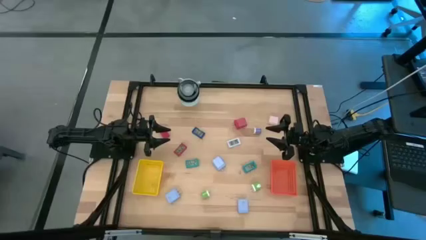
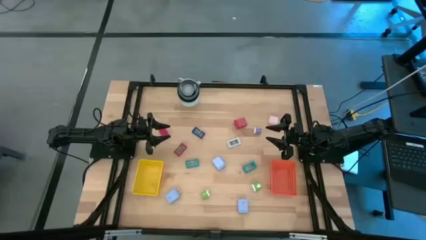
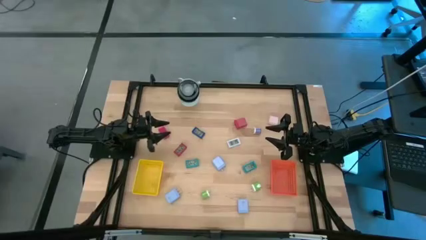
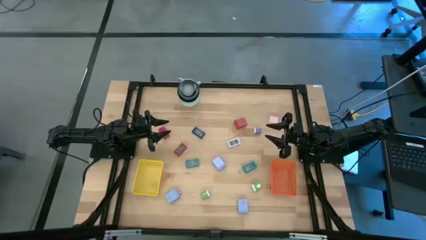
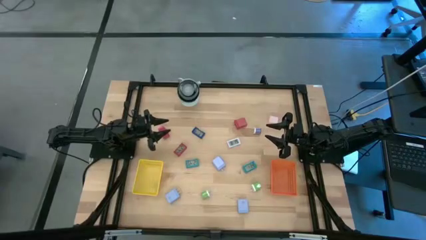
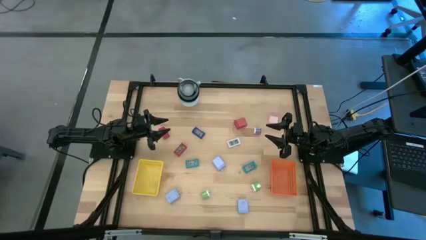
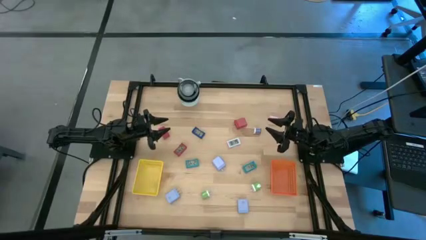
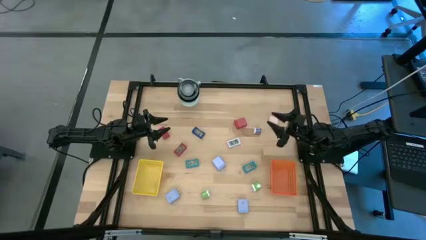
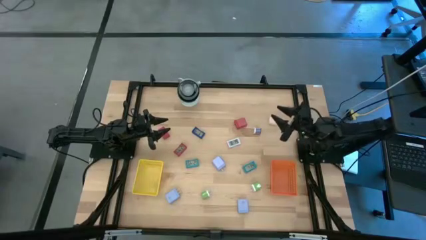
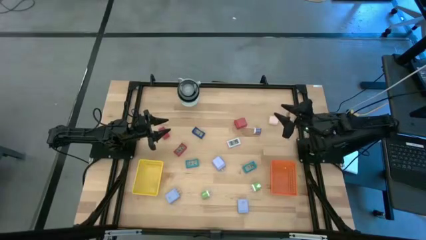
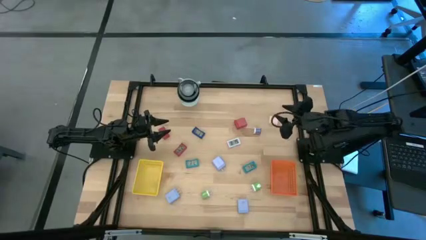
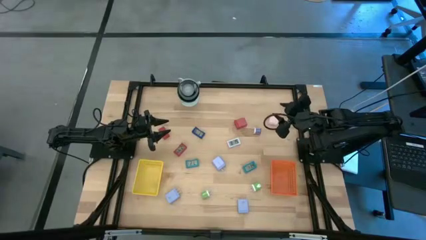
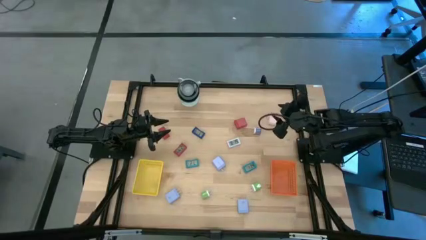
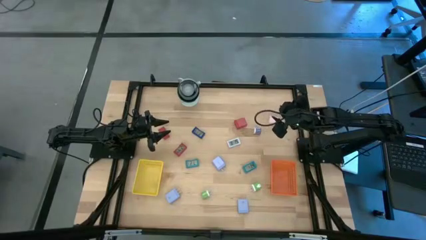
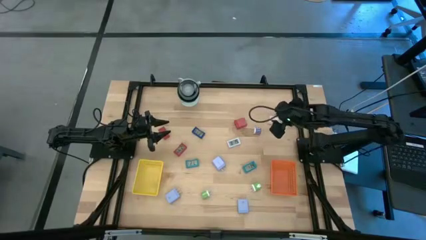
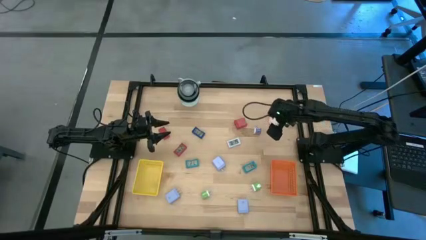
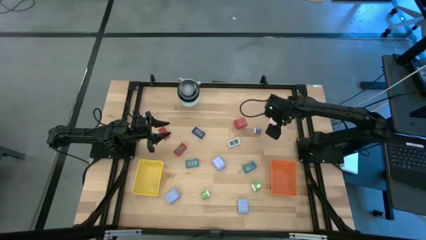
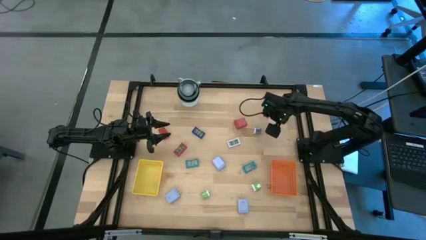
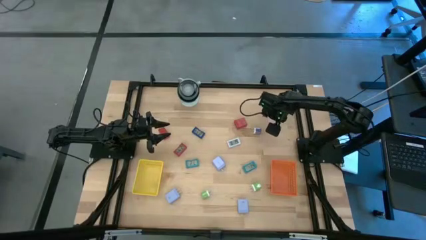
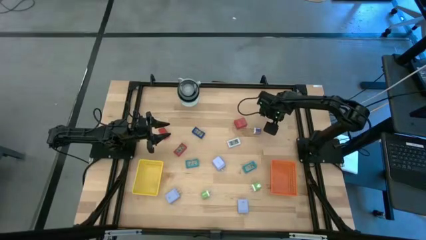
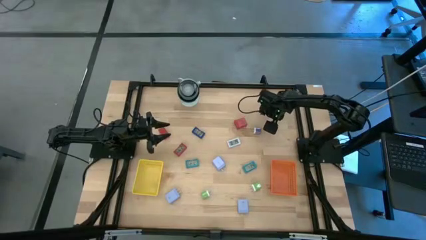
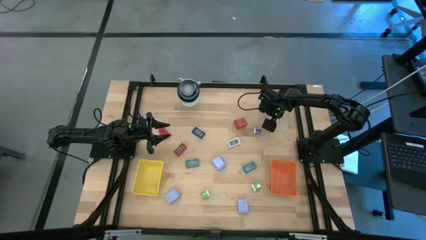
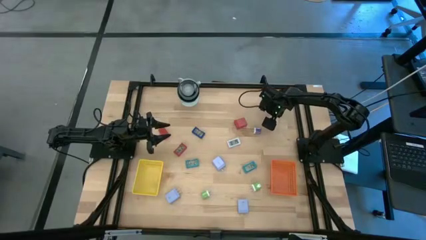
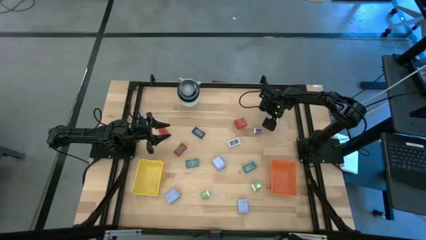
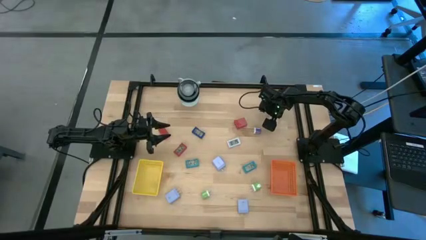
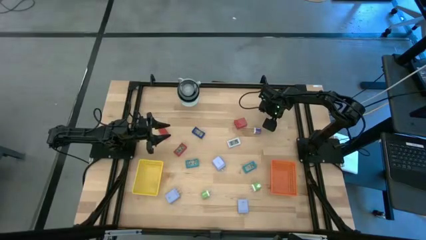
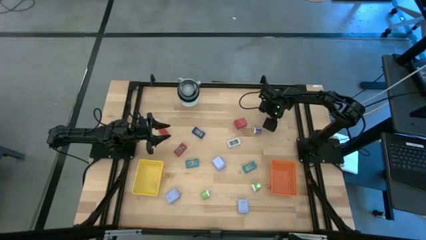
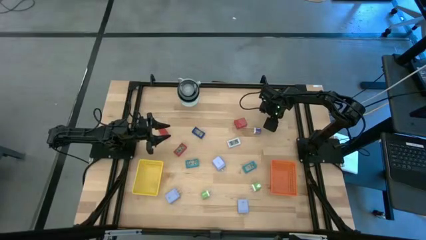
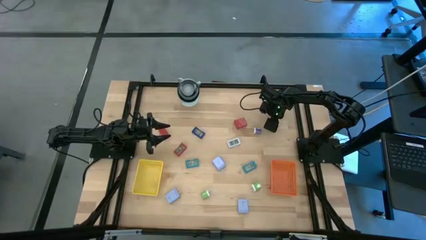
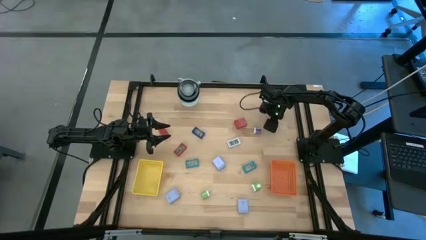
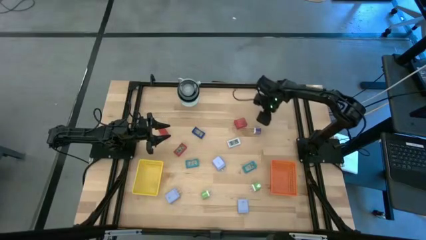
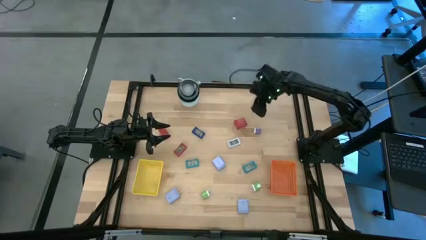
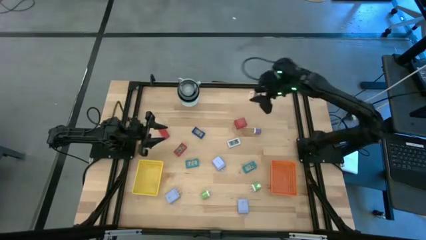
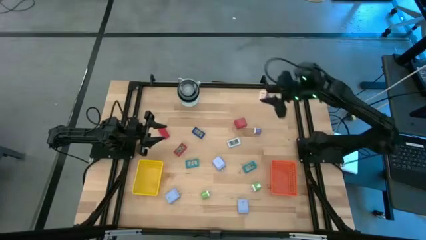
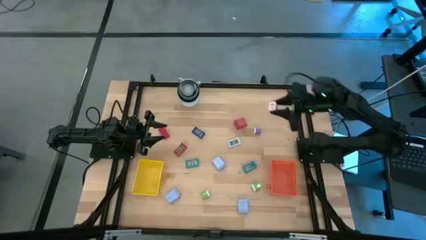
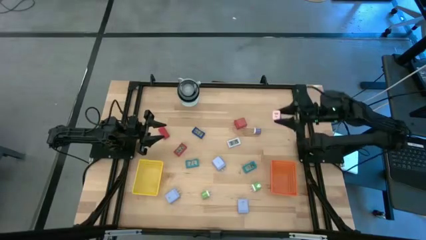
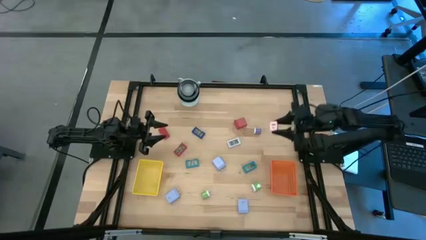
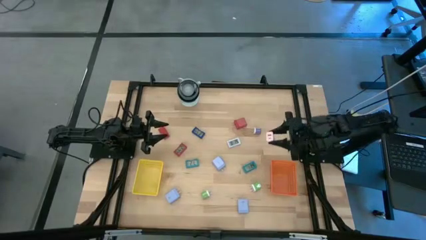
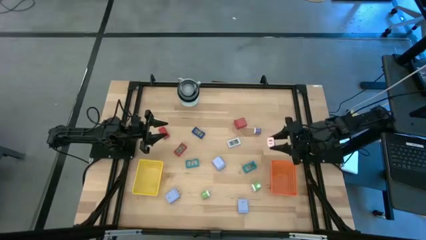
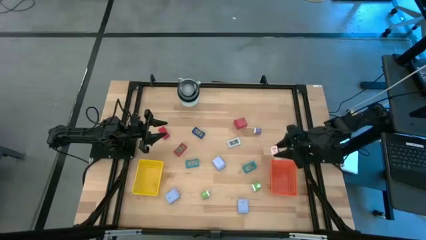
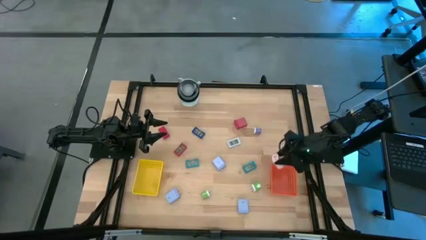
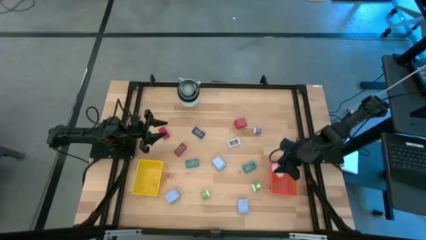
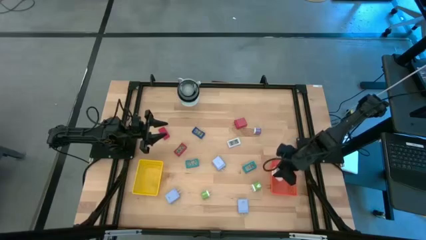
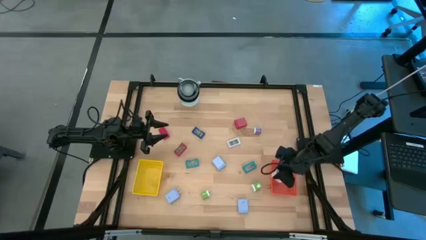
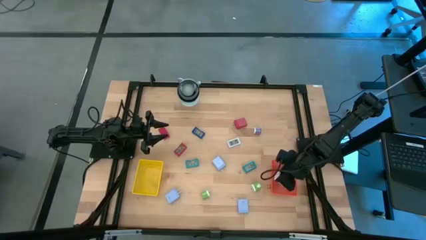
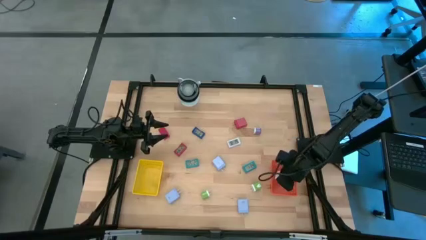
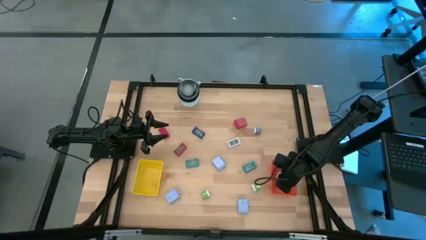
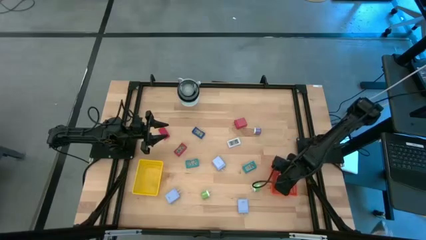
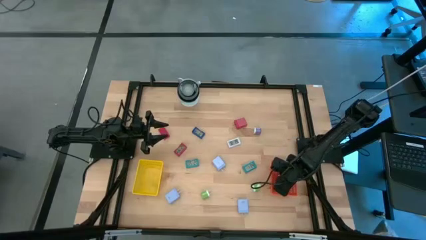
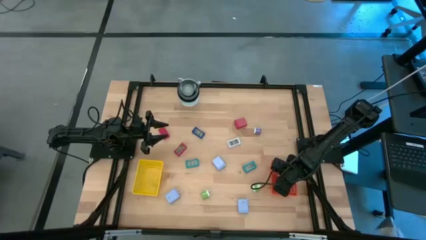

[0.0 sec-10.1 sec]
Task: Pick & Place Office items
Put the pink charger adapter into the orange basket
